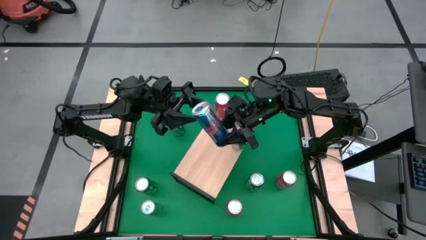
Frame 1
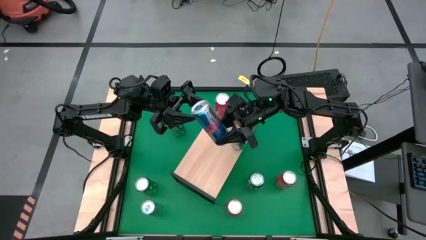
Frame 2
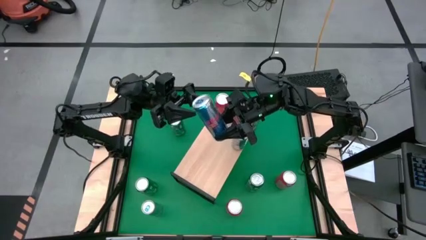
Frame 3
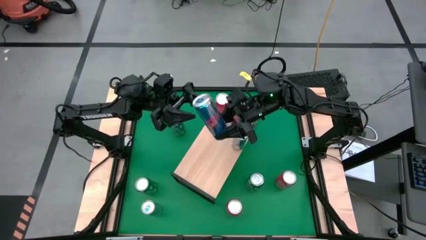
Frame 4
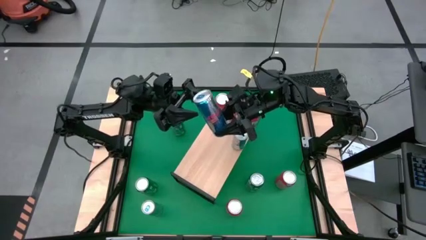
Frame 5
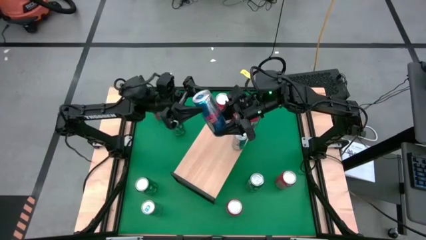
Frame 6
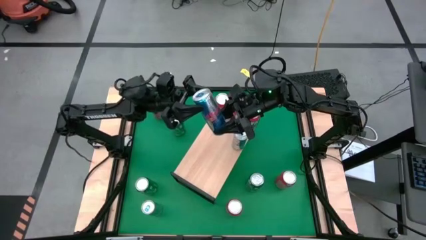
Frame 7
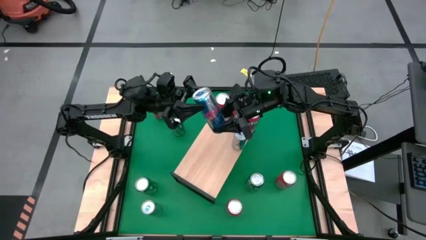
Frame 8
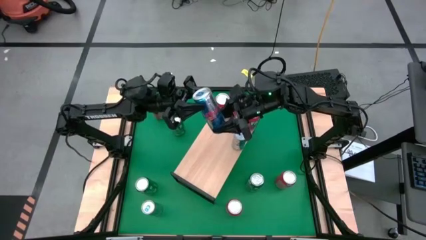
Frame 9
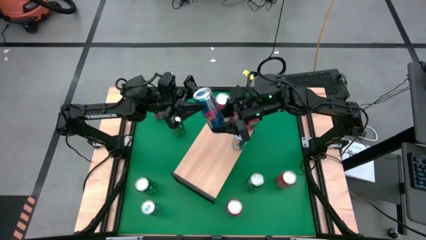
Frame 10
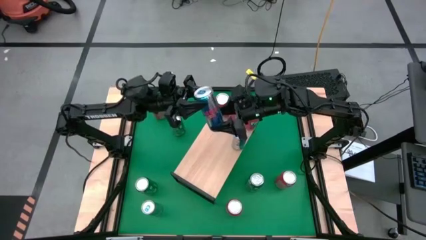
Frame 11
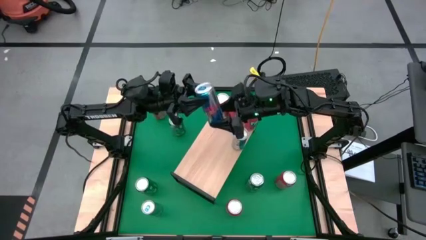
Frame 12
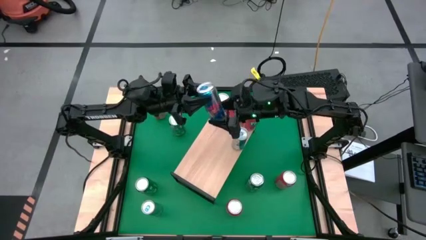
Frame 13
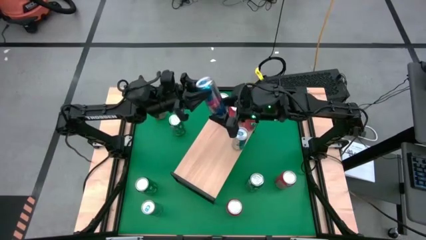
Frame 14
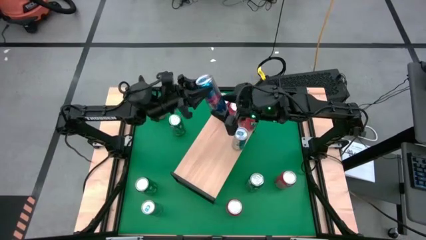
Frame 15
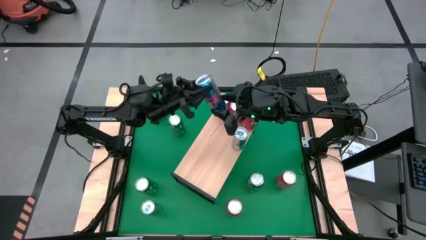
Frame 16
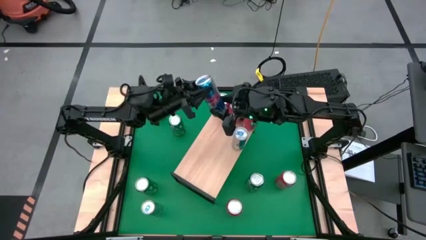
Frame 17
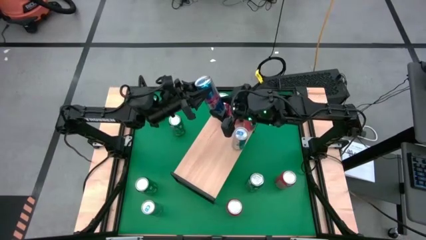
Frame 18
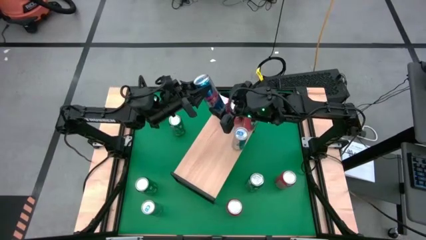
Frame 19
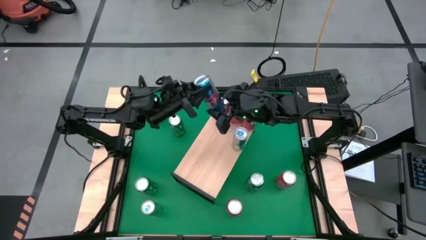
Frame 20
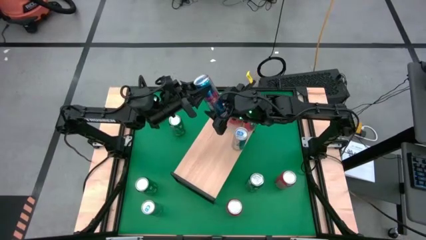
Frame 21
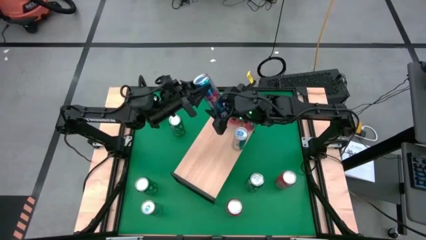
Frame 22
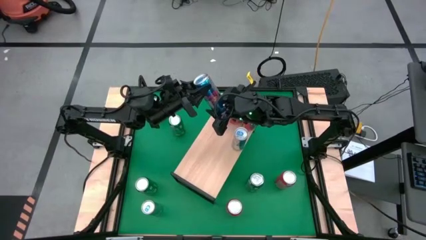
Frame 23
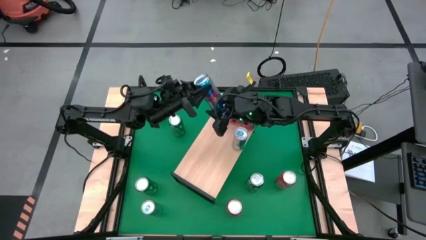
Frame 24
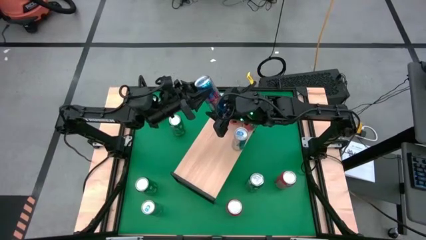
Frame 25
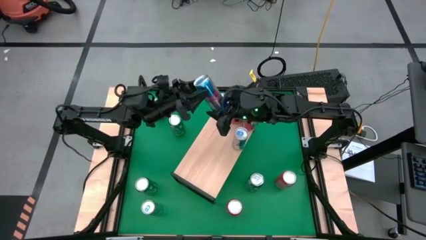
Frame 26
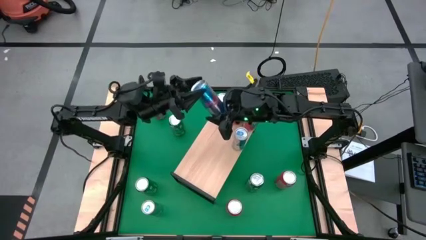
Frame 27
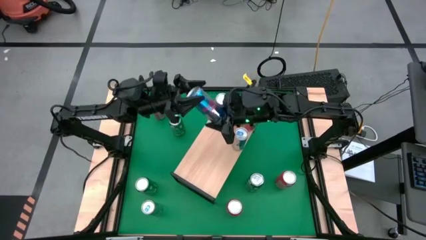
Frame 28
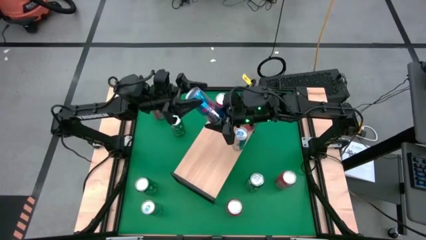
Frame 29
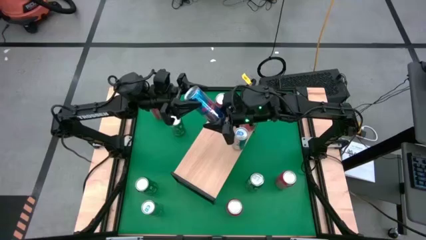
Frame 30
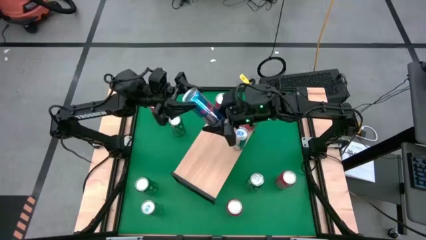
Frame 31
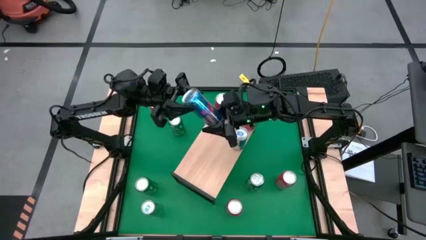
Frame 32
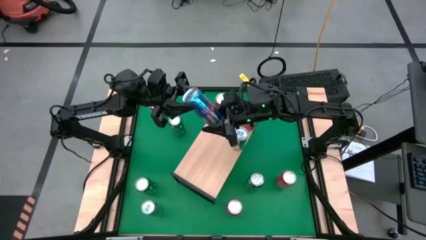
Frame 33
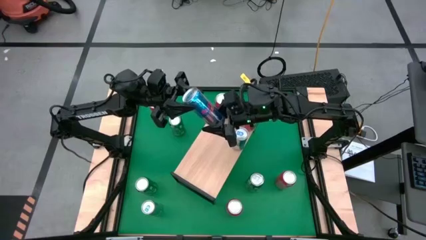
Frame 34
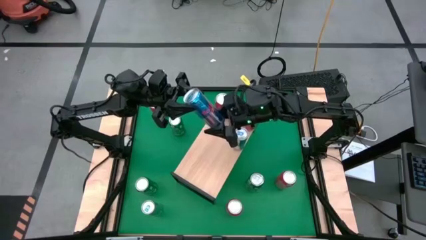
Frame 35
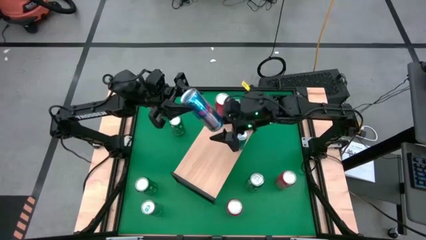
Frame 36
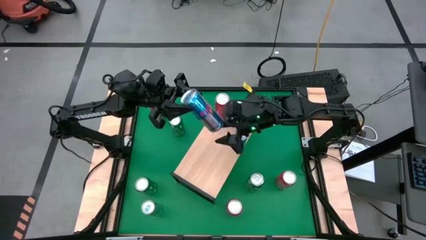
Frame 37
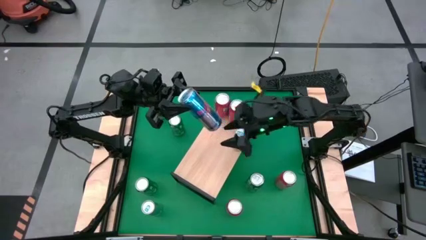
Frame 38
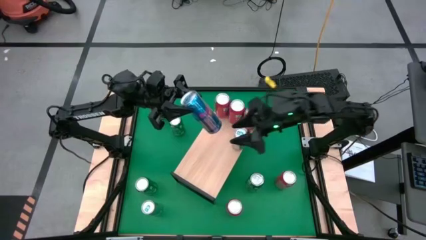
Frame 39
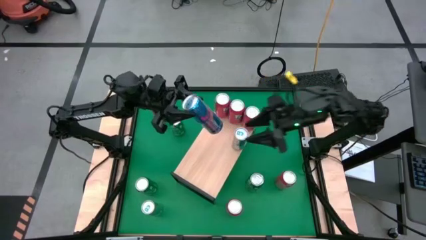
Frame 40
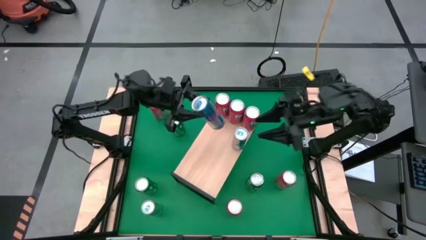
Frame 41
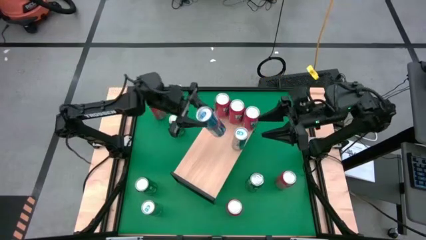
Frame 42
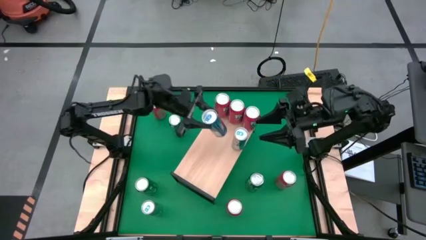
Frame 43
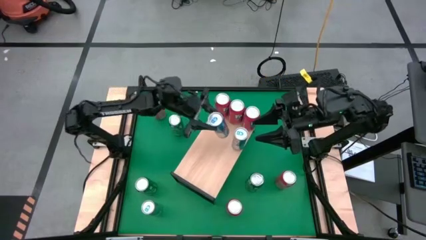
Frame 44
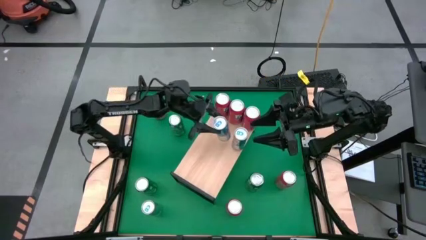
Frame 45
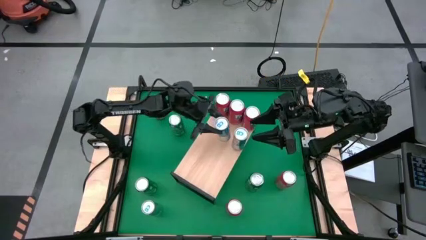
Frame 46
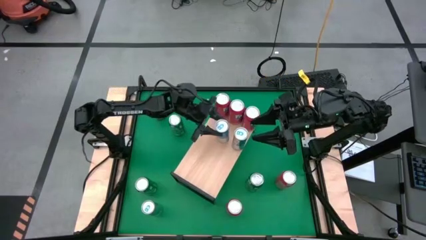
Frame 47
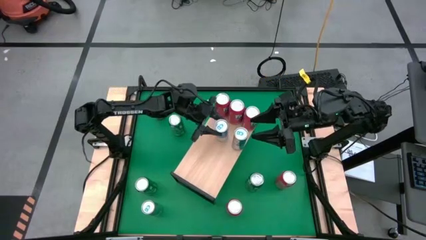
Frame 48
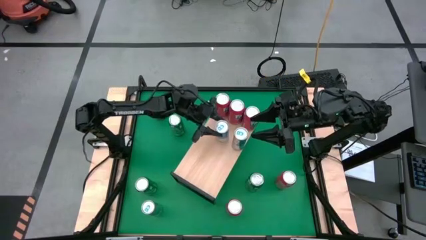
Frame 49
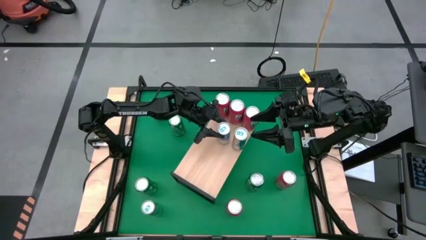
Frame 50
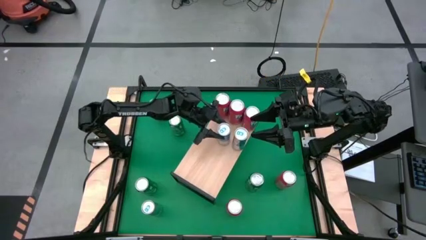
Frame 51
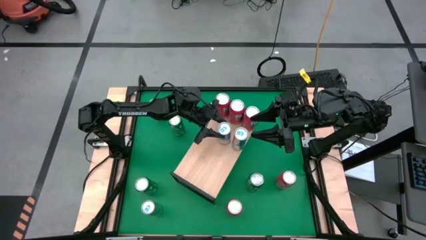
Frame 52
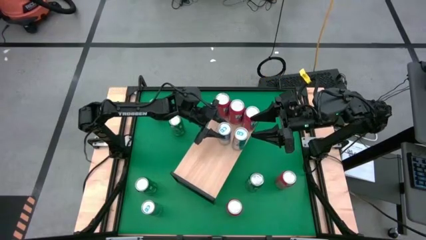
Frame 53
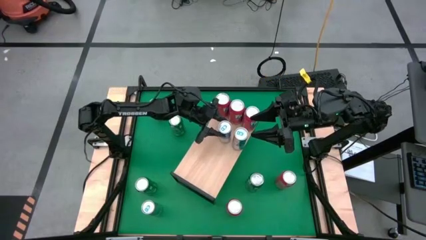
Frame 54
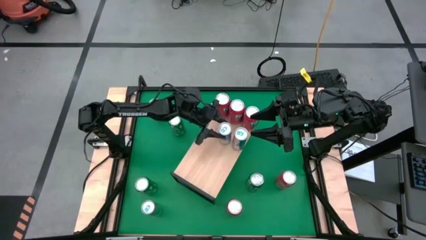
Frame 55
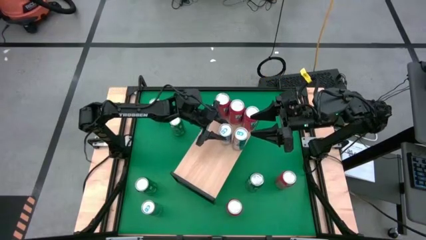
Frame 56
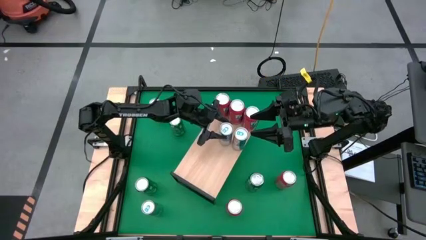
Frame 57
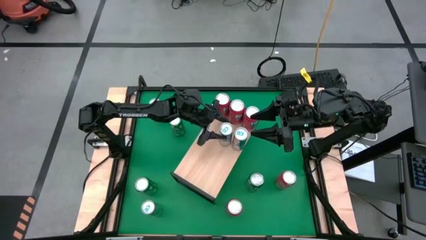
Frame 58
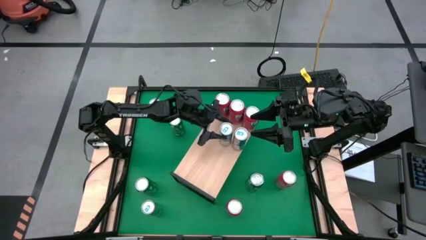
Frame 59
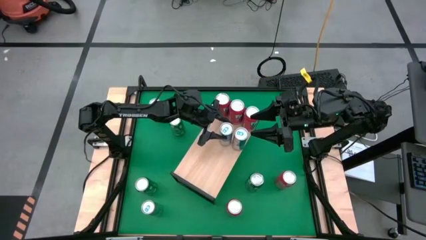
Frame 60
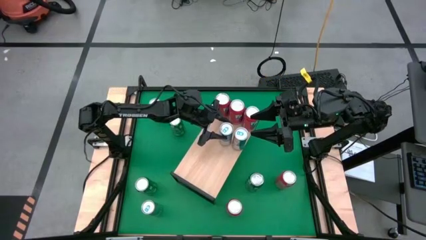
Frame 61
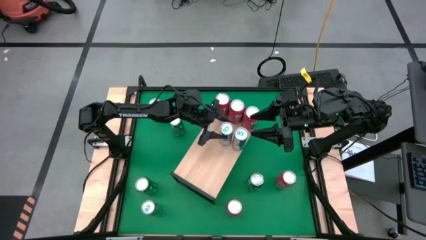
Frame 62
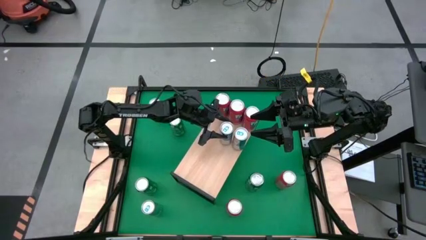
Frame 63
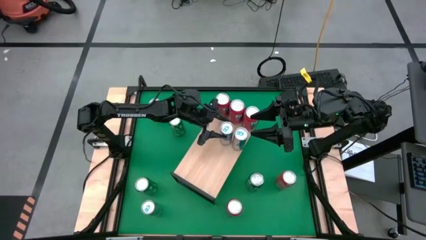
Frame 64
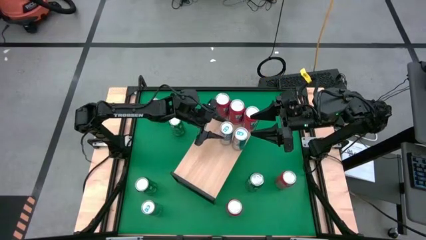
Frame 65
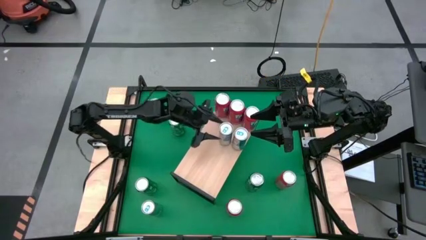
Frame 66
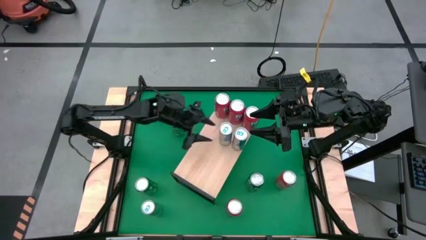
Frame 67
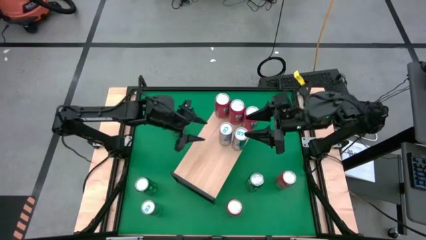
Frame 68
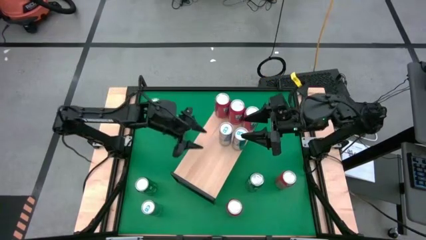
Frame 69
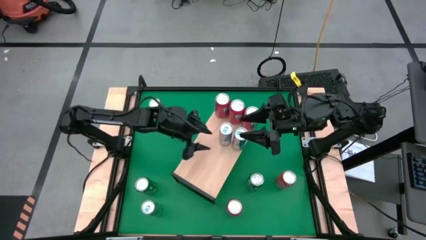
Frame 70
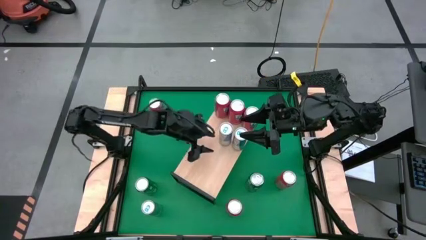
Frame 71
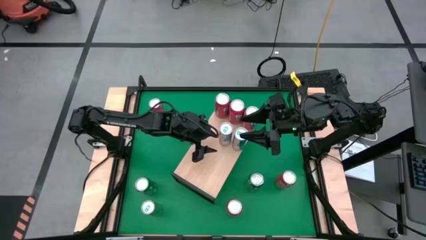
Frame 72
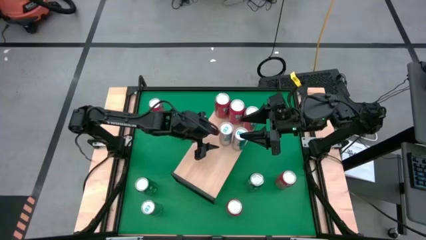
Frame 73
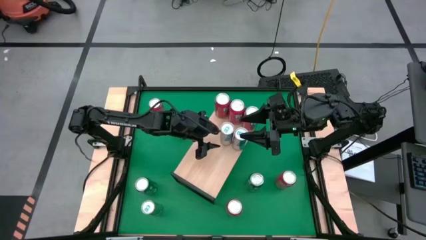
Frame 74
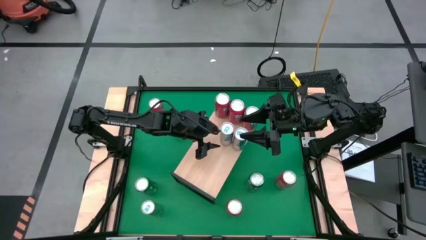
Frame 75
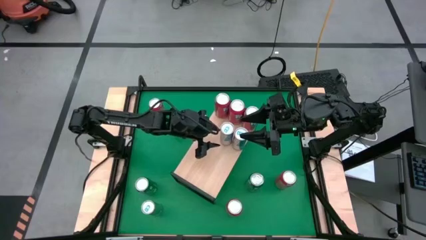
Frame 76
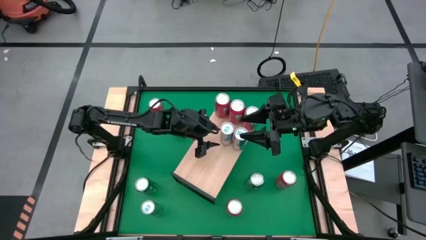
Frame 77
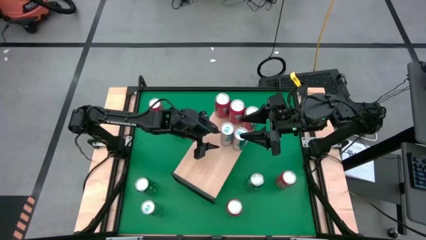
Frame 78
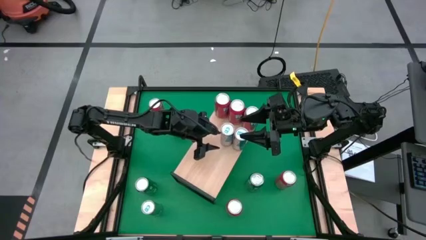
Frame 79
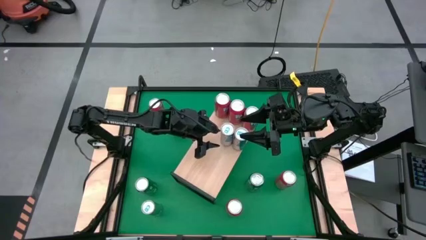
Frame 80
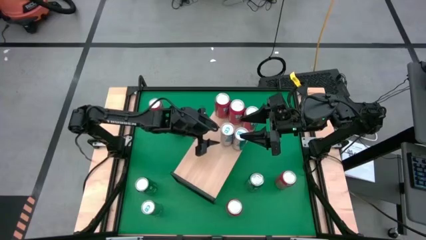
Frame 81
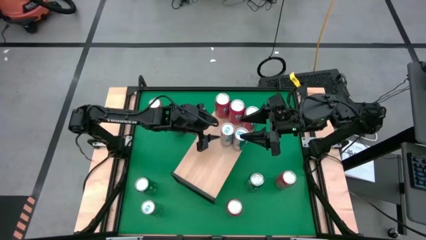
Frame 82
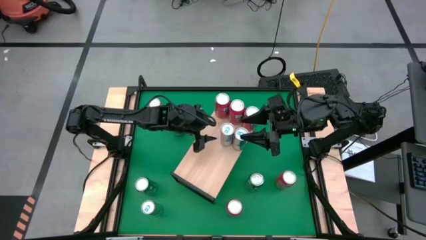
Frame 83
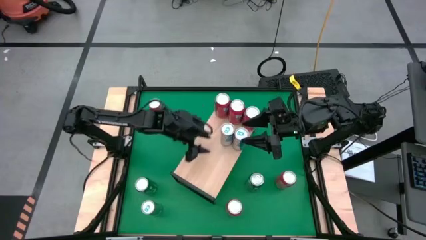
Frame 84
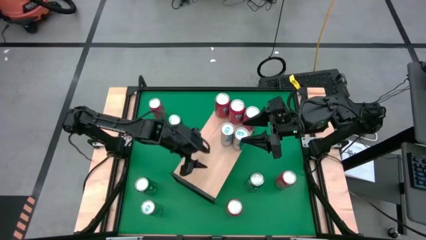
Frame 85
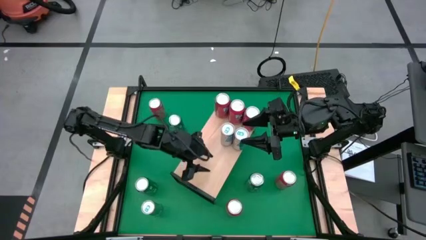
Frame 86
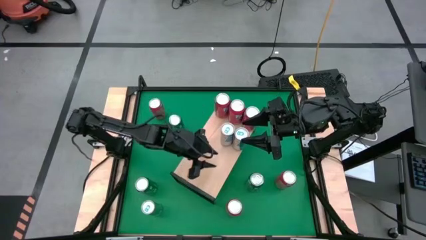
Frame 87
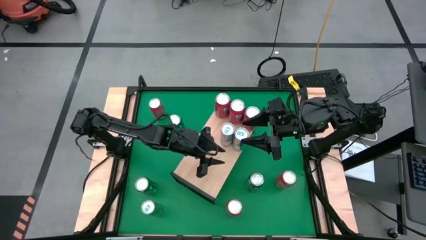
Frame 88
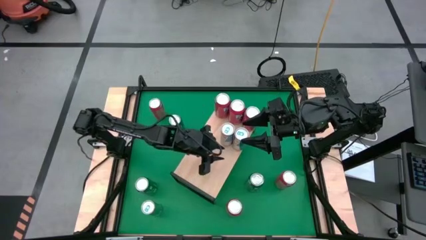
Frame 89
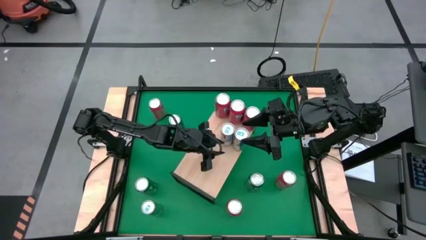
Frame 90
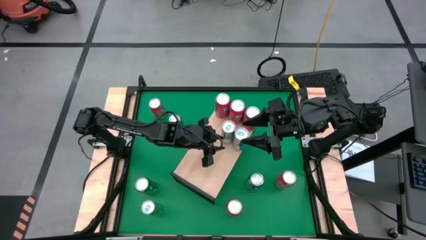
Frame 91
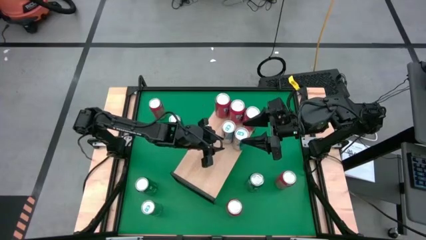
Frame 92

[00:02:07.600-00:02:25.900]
Task: Sort soda cans
Put the blue soda can on the shelf and align it with the other blue soda can
